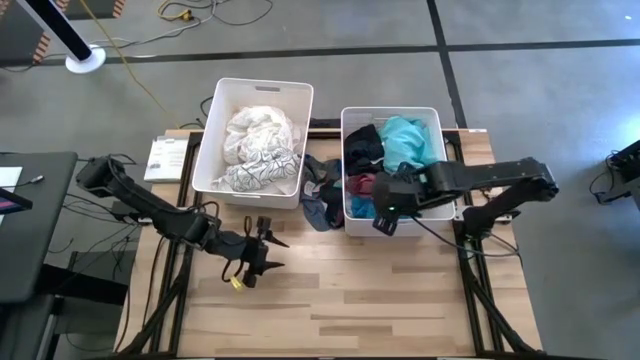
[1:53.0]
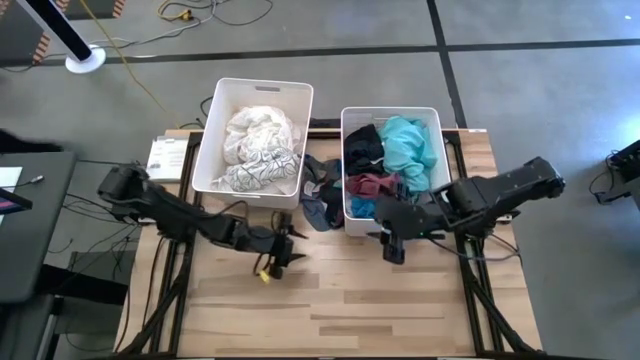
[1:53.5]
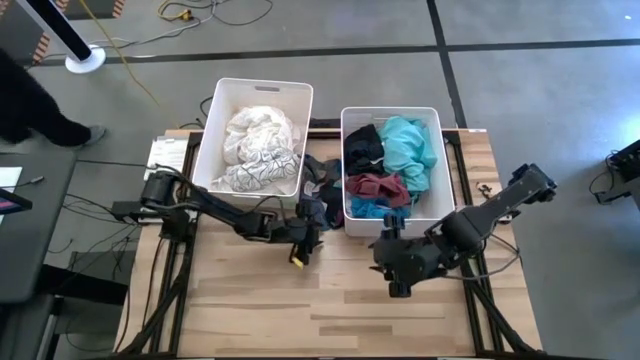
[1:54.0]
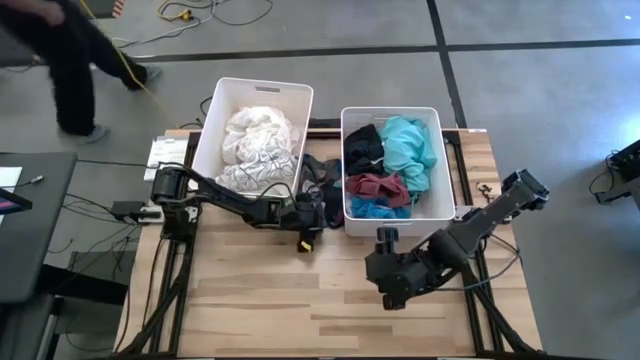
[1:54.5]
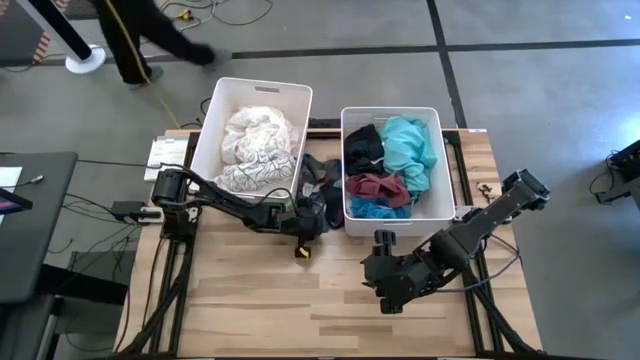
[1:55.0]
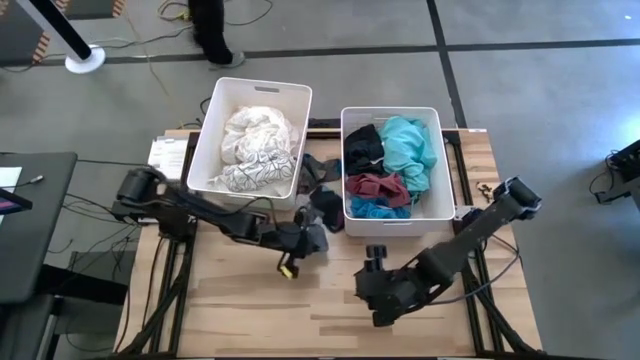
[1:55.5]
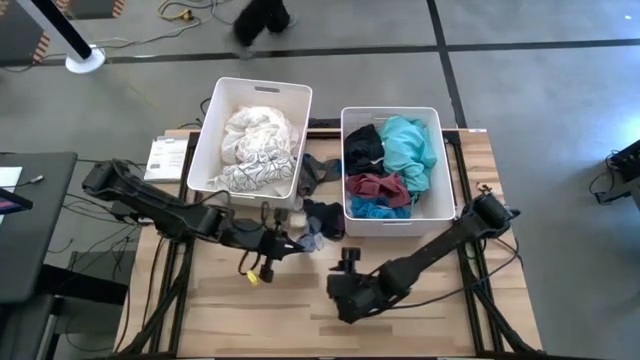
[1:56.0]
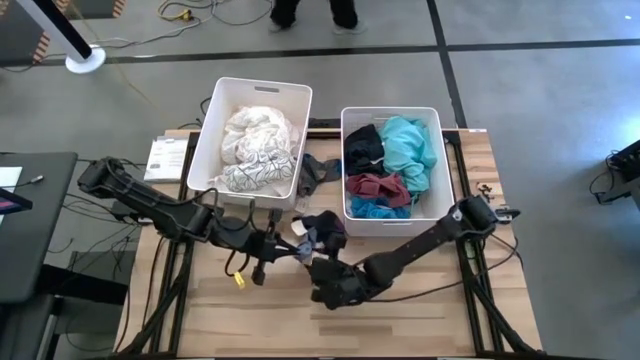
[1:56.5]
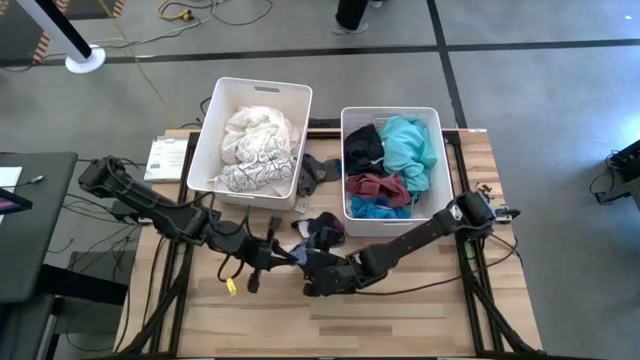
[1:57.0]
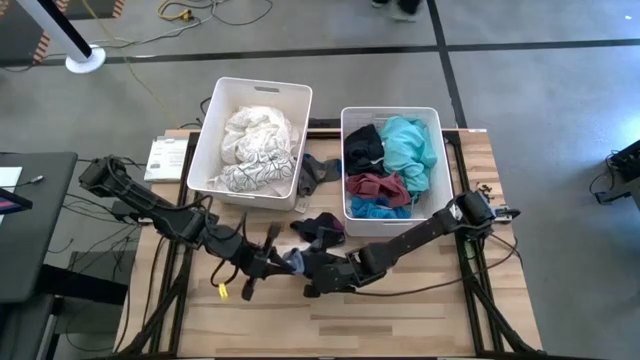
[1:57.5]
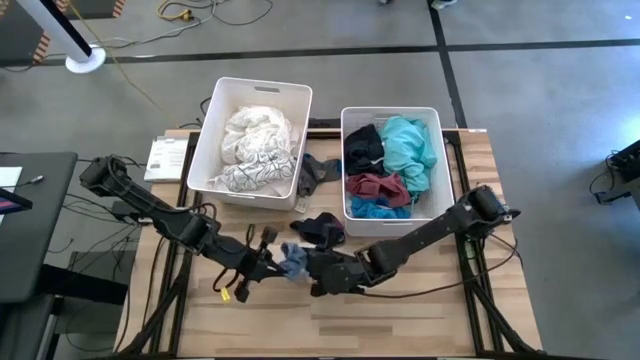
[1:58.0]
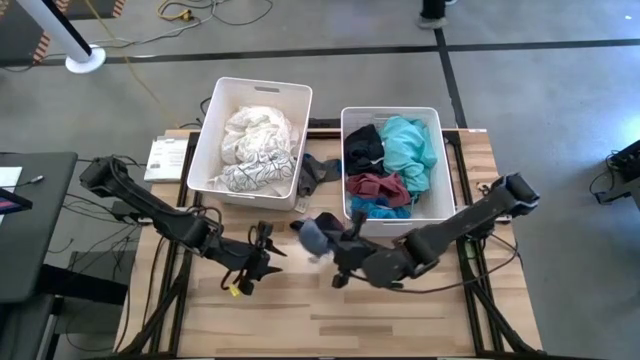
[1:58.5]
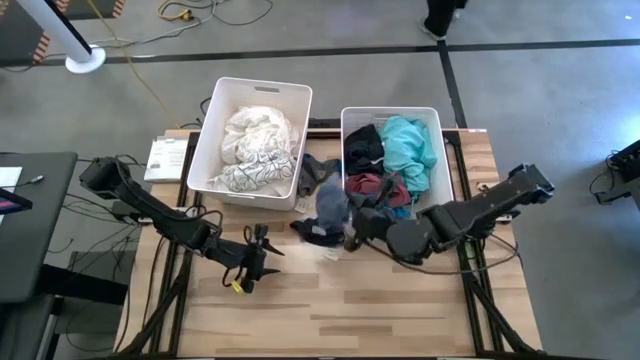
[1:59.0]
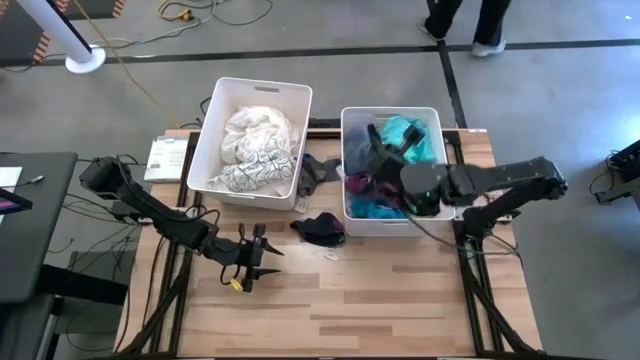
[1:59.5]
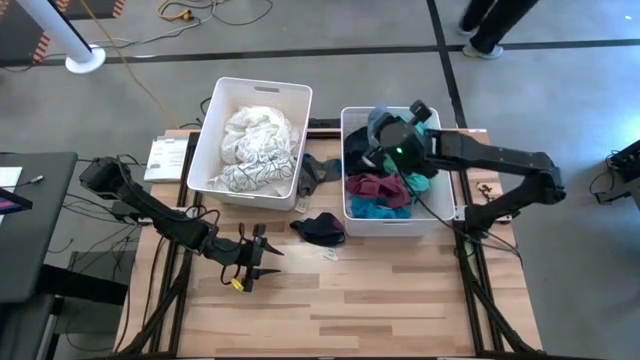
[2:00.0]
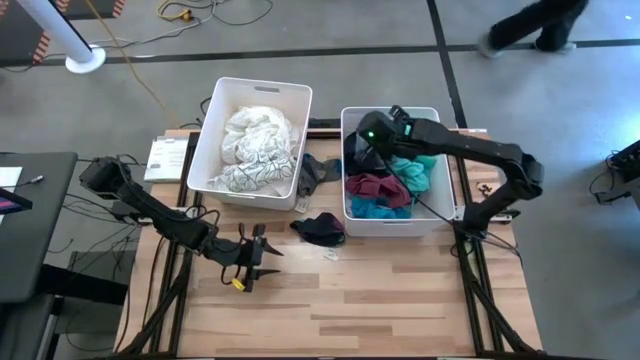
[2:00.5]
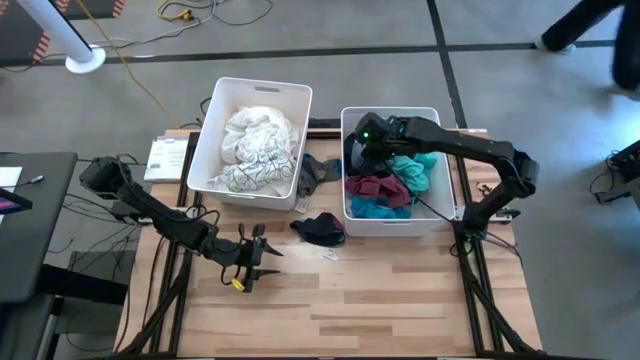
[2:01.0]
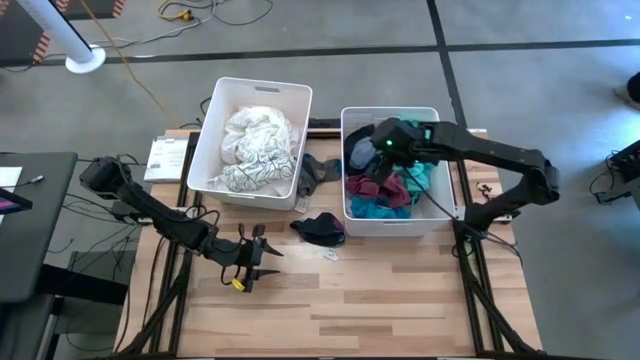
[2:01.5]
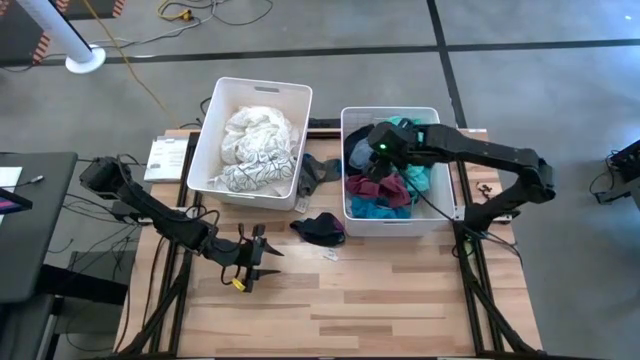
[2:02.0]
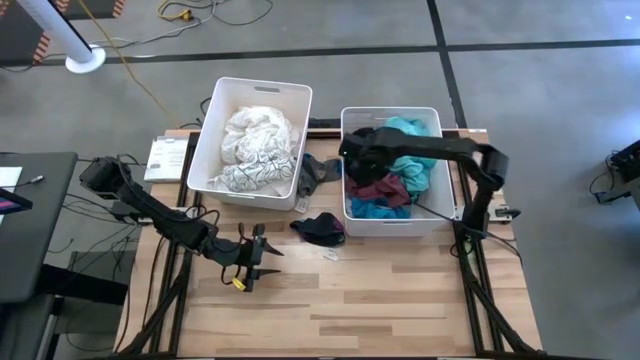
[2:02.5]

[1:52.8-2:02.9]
Task: Sort clothes
Put the blue sock into the right white laundry bin

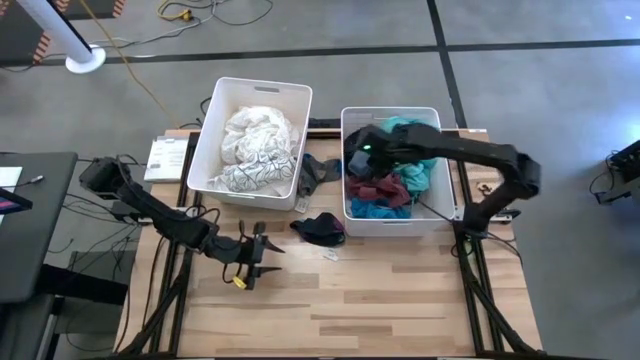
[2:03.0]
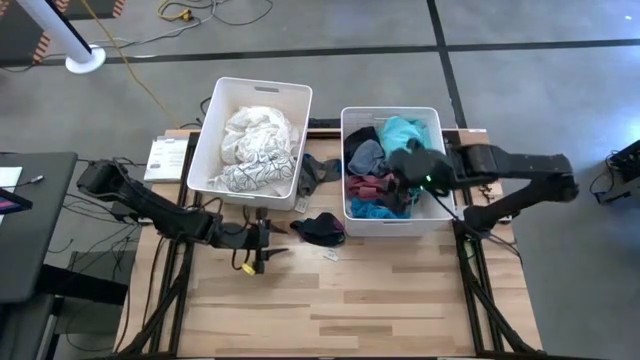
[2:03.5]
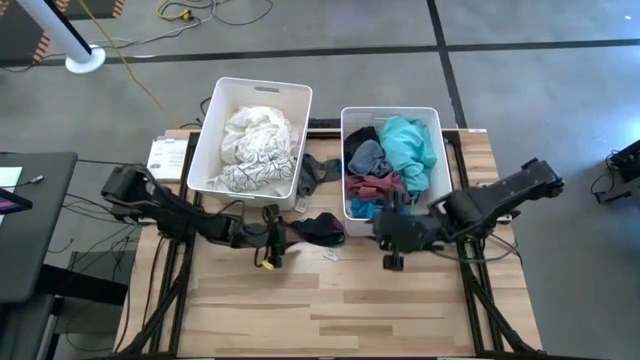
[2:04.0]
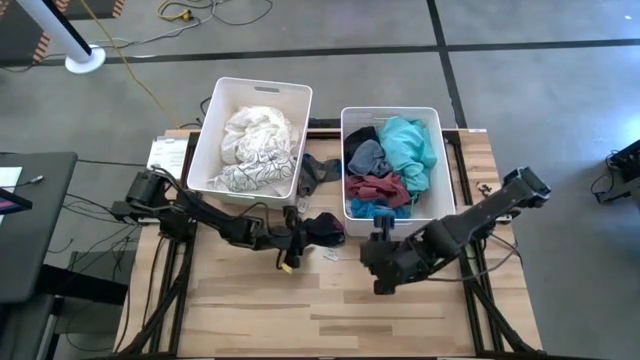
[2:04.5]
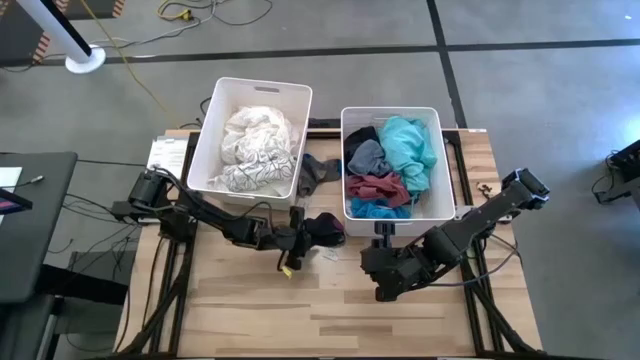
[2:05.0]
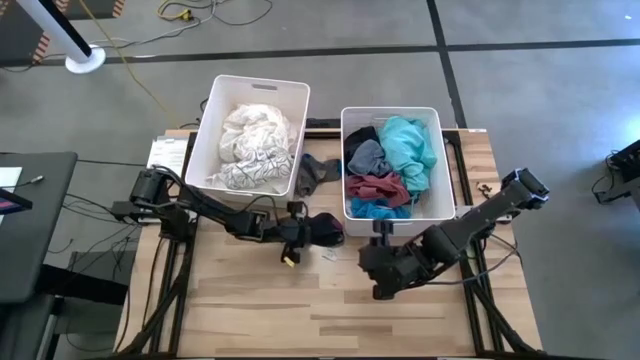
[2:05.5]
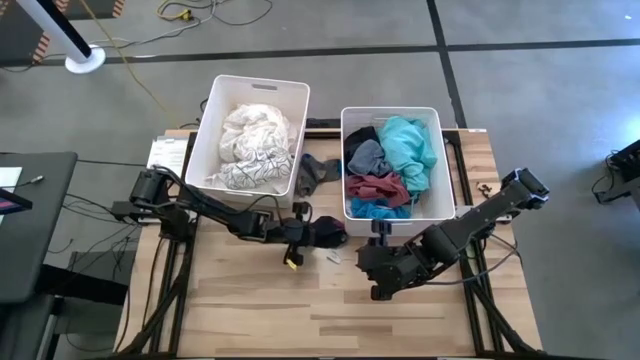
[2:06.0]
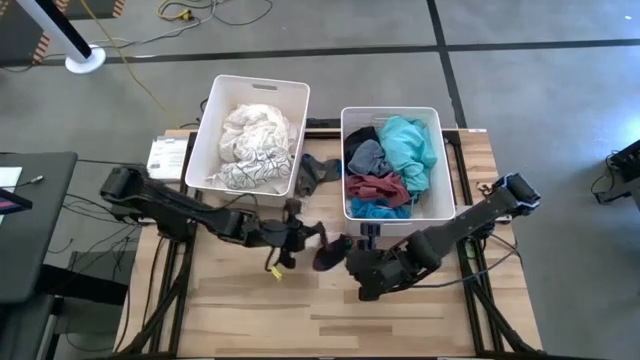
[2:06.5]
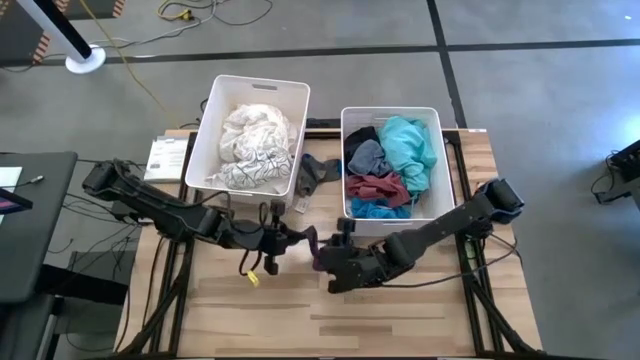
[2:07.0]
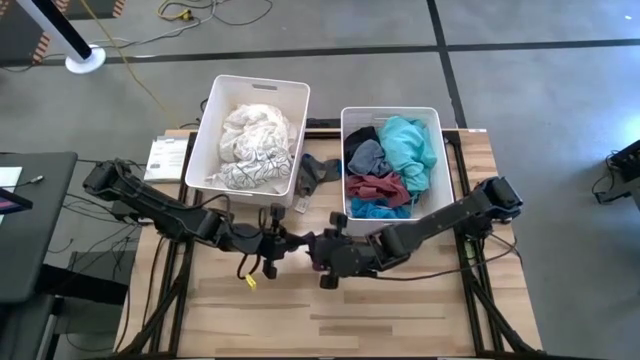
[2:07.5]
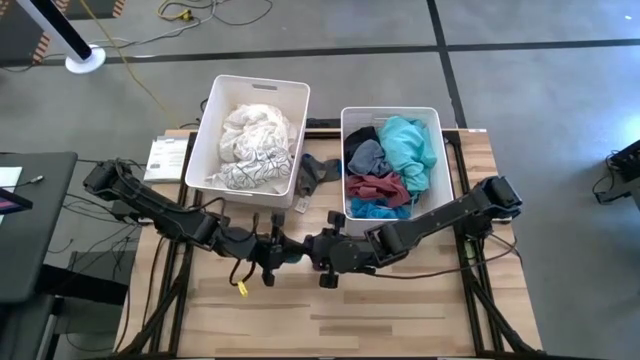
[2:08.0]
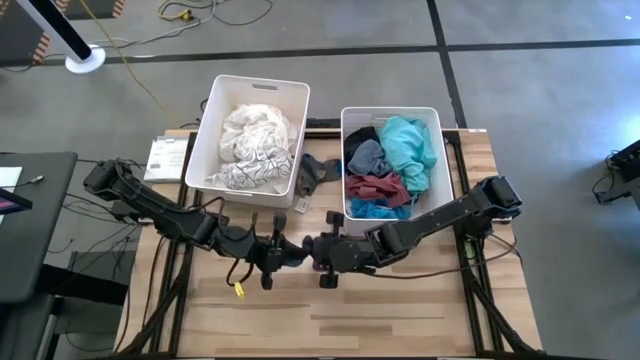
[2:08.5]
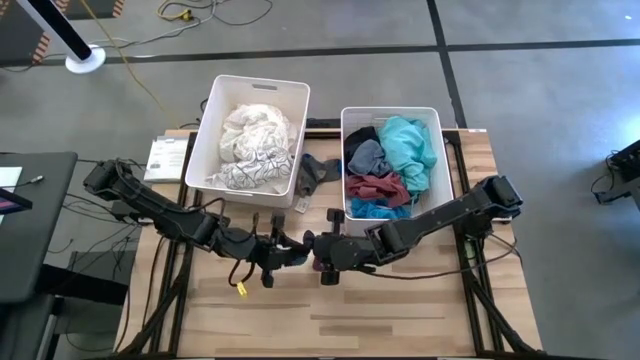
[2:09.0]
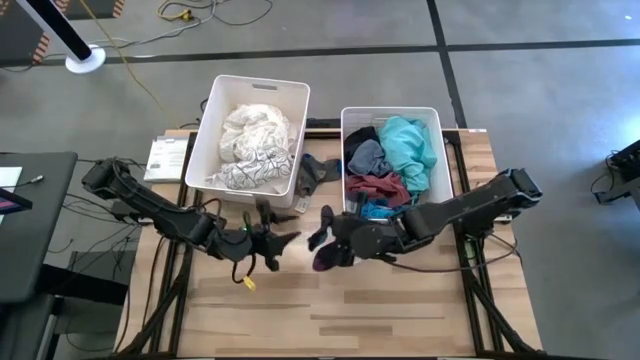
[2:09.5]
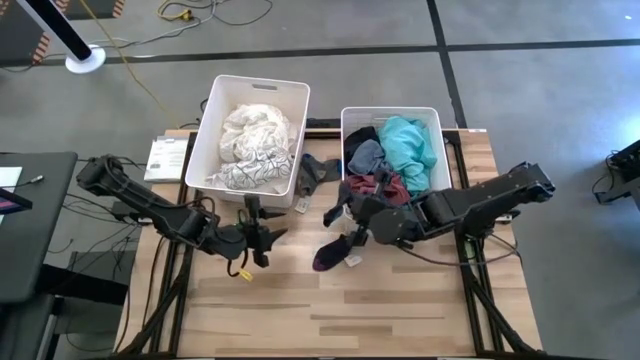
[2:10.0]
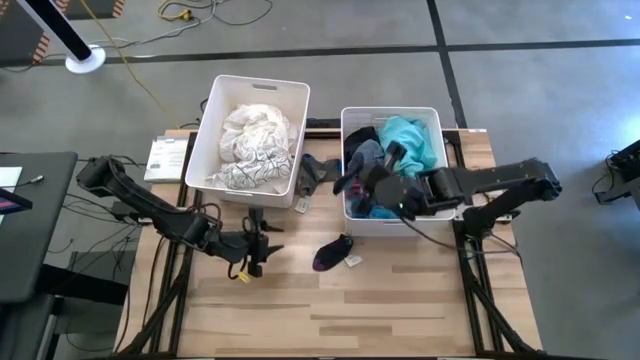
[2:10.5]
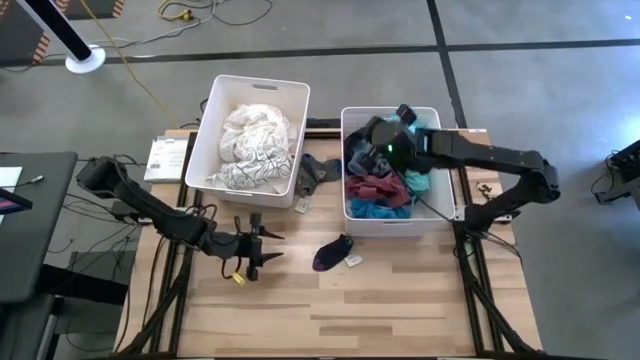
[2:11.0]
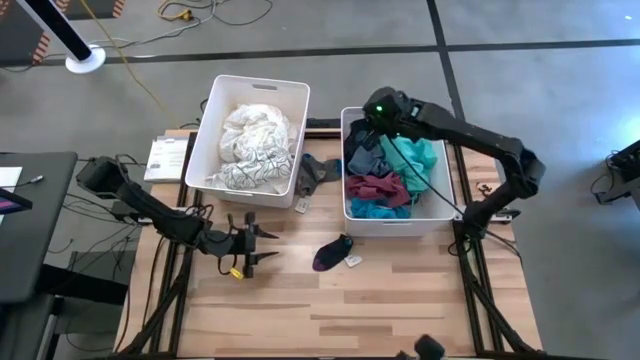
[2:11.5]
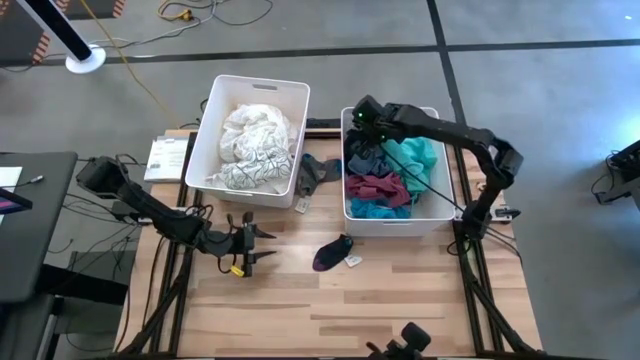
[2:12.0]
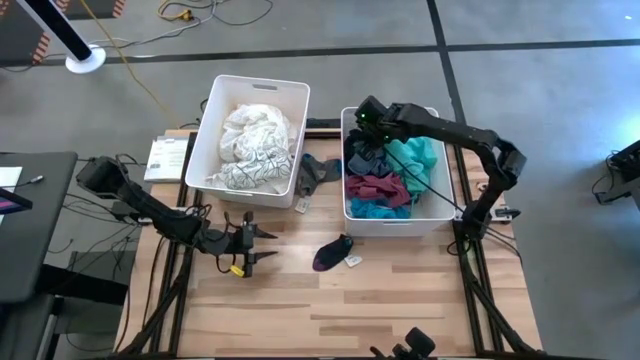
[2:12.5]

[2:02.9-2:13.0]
Put the top dark blue sock into the right white laundry bin

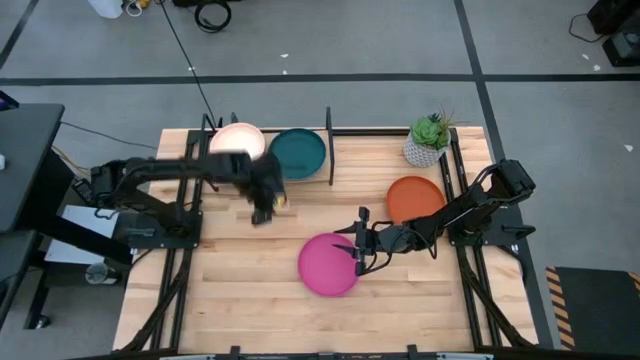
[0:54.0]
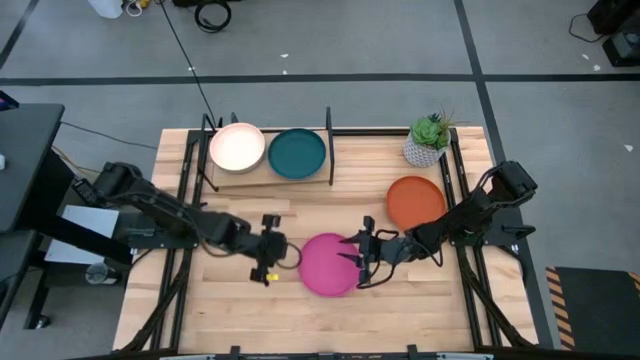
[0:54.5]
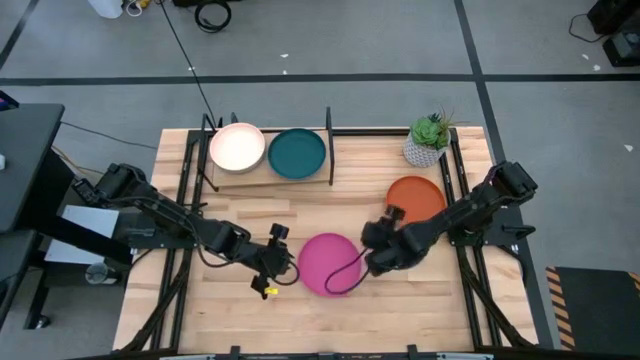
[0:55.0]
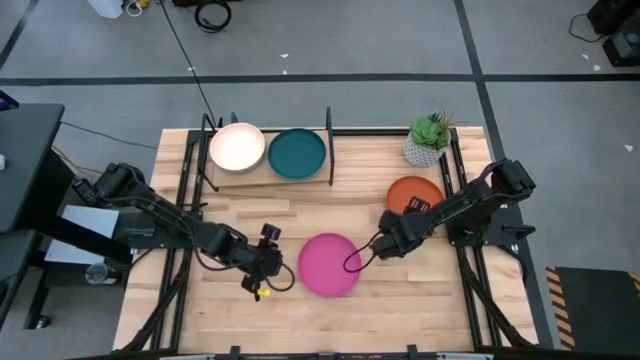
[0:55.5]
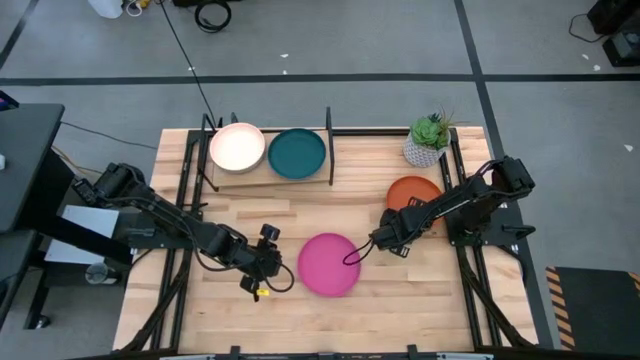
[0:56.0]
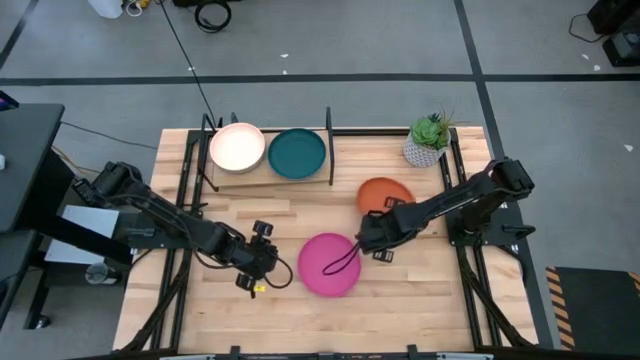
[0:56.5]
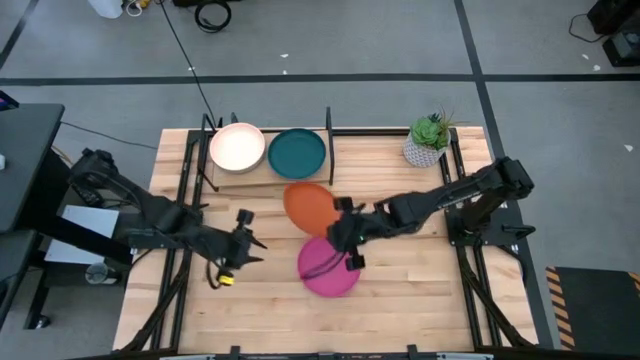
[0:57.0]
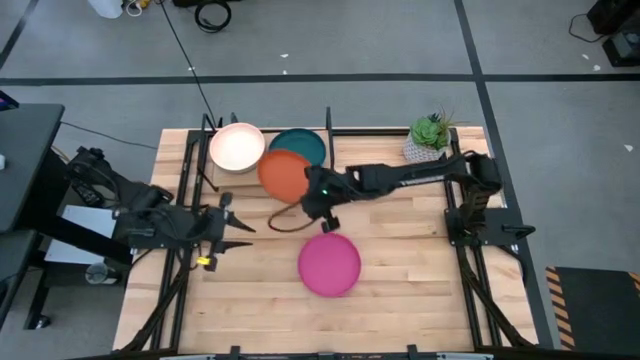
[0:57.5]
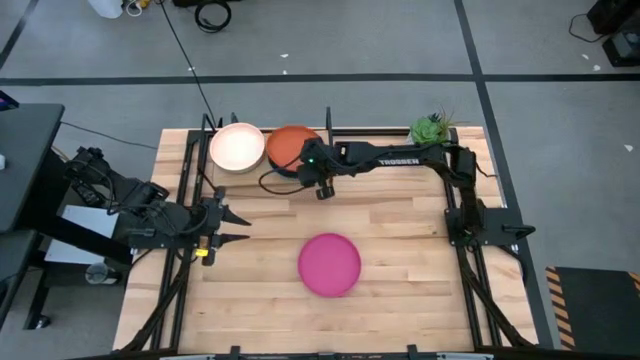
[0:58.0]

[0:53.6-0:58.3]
Task: Place and stack plates onto a shelf
Stack the orange plate on top of the green plate on the shelf
